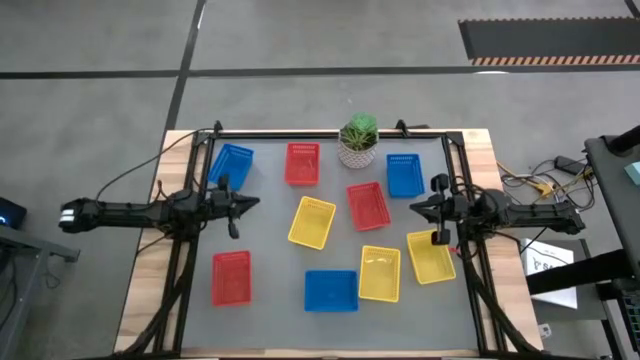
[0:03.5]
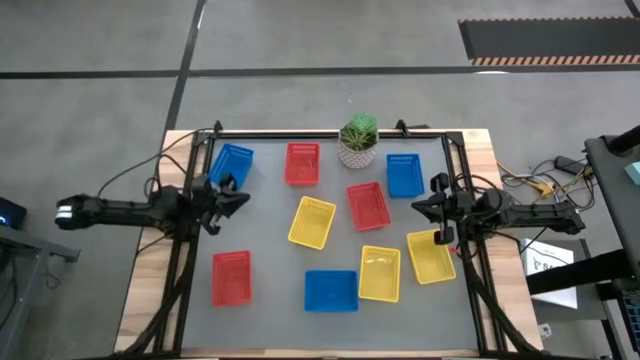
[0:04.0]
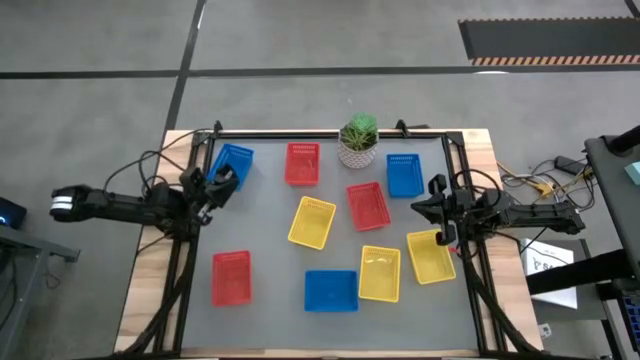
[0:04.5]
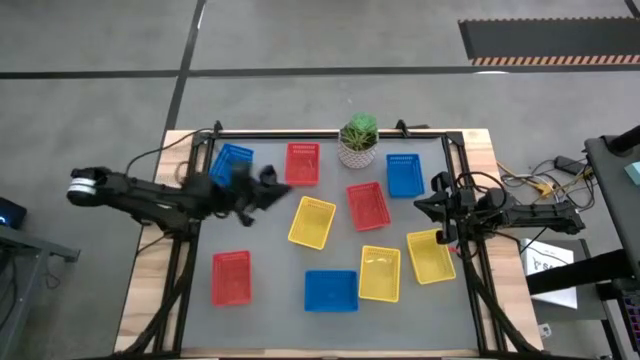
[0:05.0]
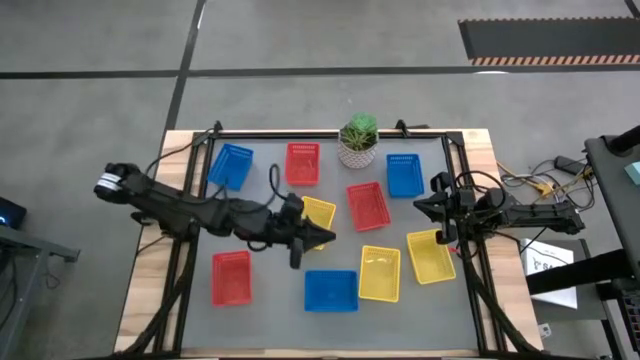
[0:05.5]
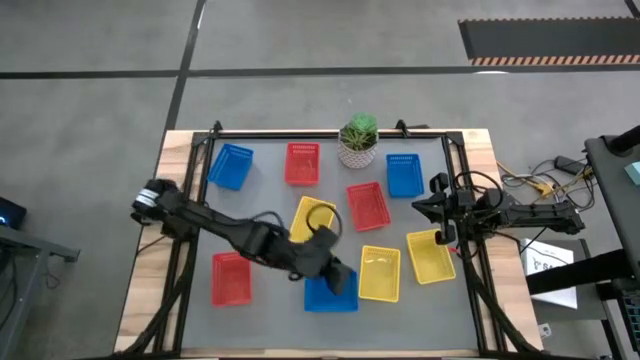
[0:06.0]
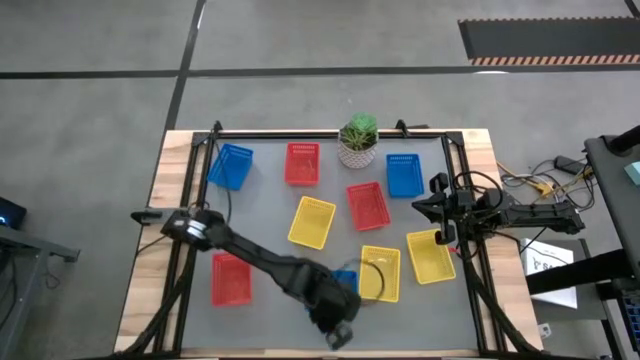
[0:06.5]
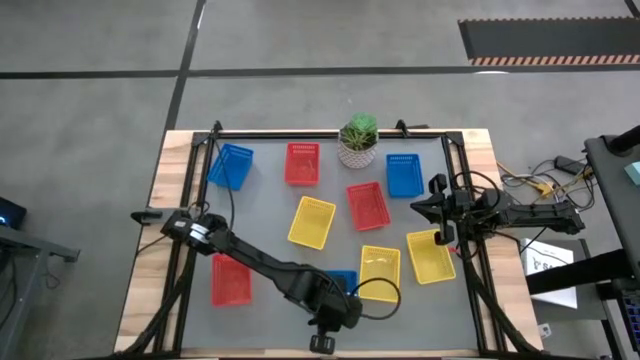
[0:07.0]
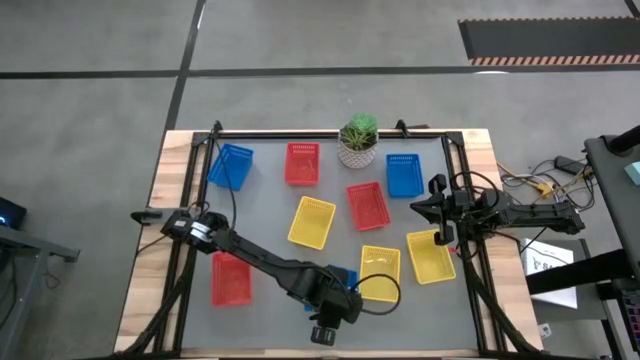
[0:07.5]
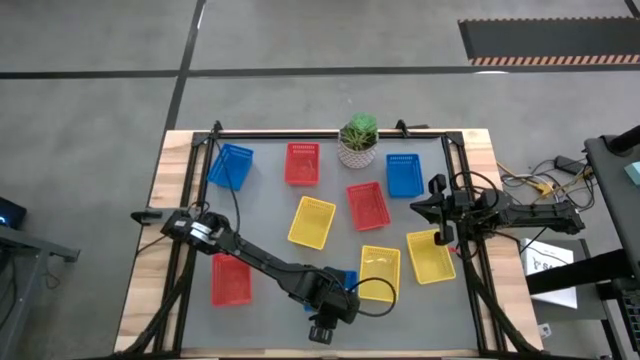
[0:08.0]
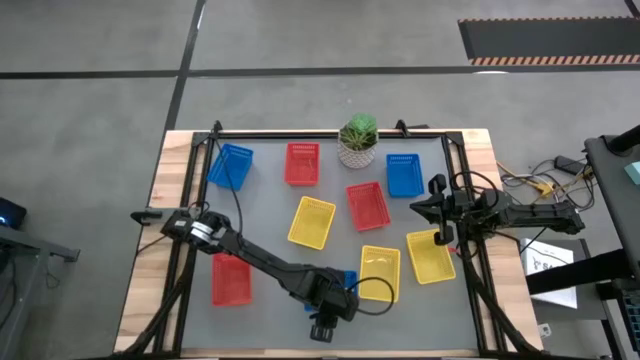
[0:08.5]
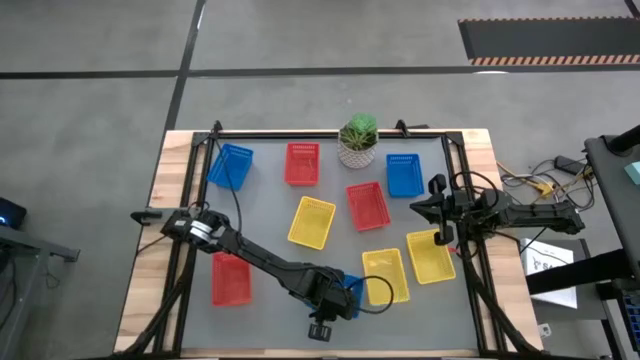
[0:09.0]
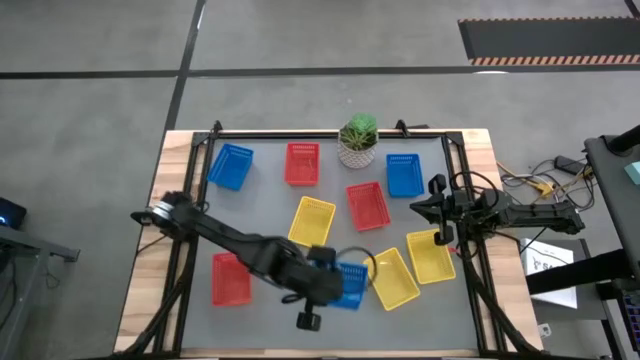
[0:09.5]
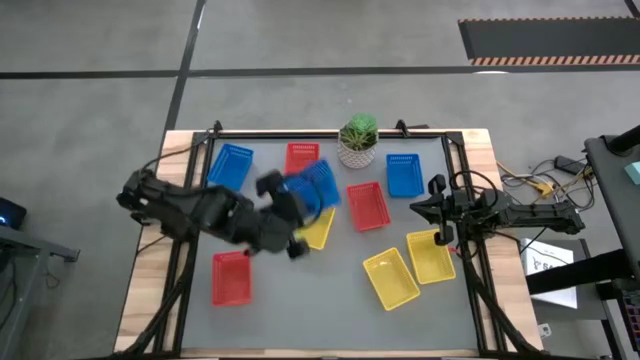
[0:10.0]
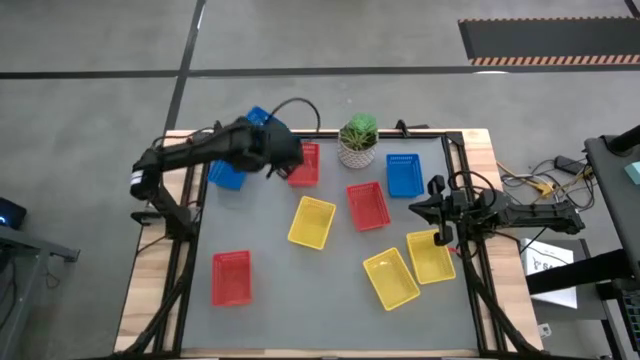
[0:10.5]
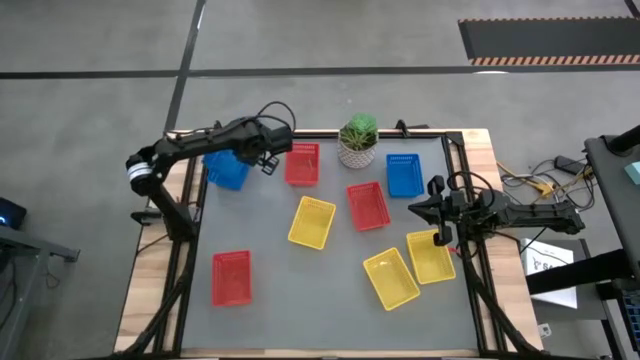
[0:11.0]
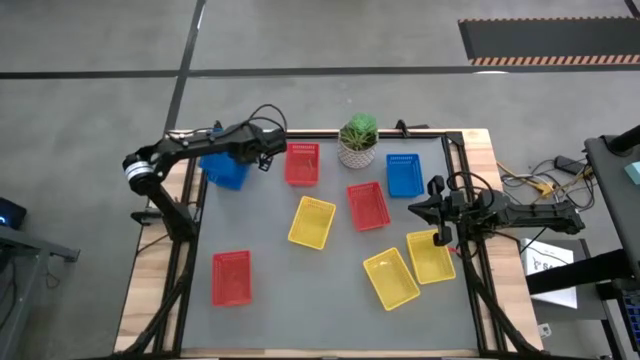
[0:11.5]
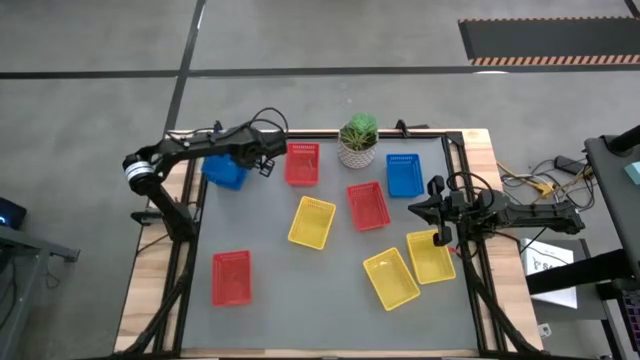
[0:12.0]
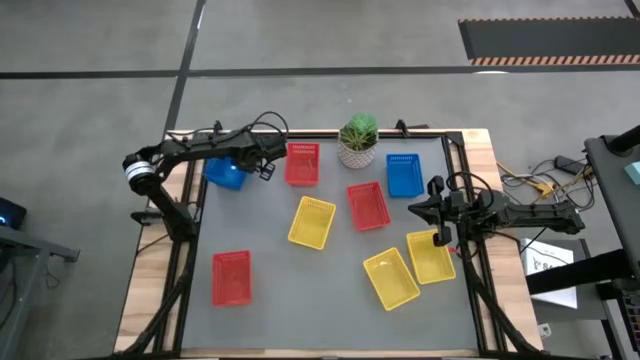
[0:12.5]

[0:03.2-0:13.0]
Stack the bottom blue bin on top of the top left blue bin

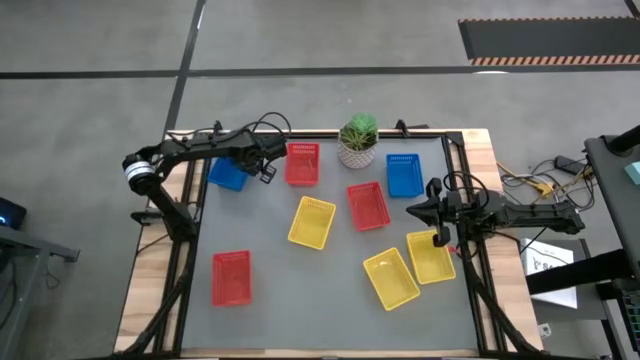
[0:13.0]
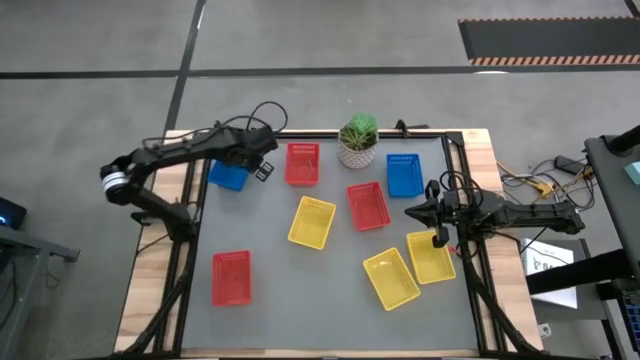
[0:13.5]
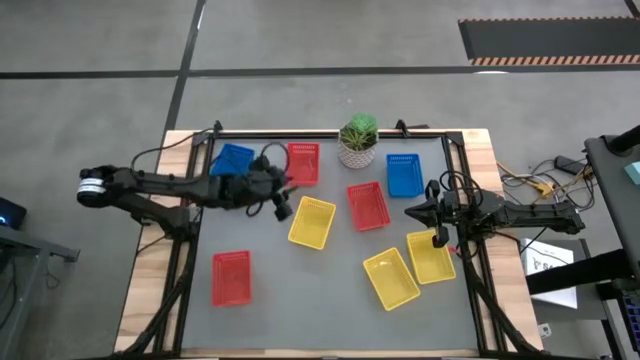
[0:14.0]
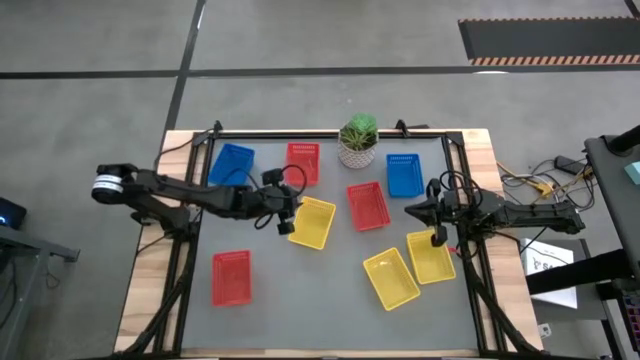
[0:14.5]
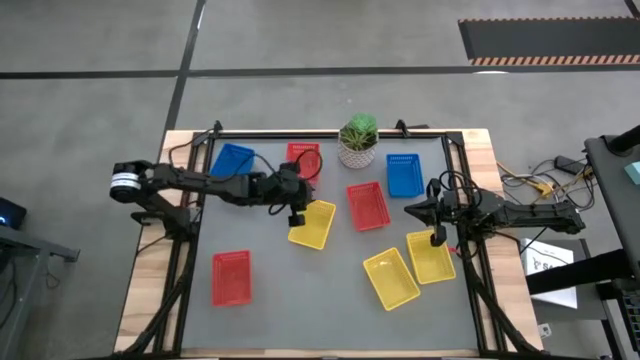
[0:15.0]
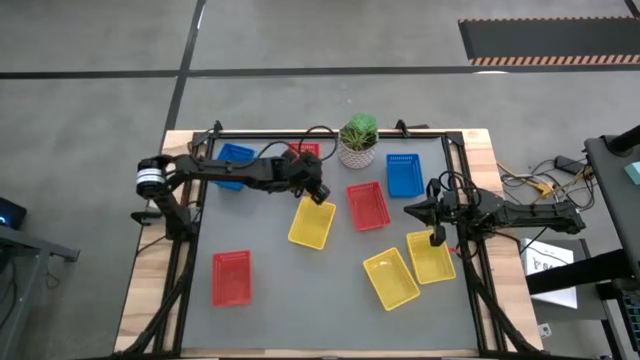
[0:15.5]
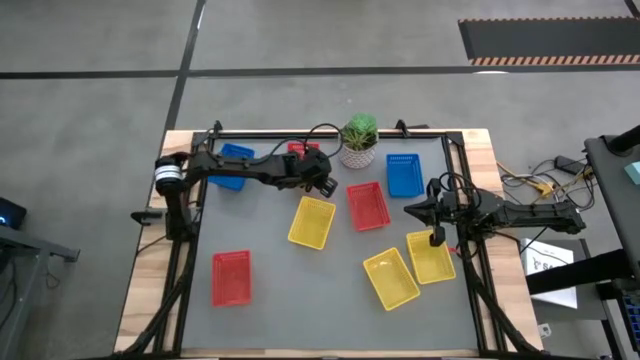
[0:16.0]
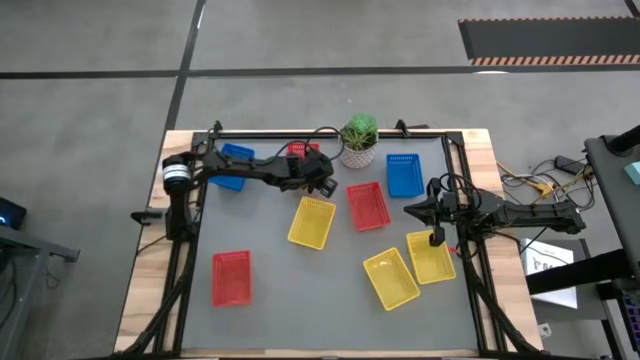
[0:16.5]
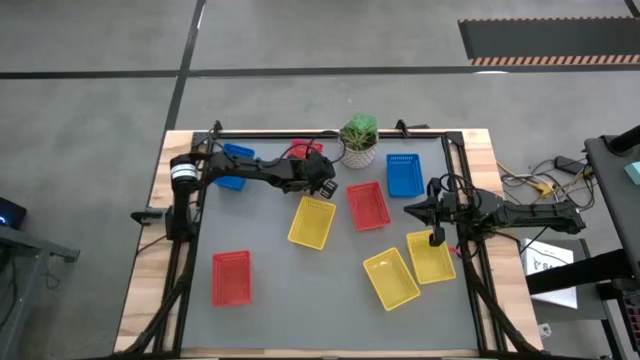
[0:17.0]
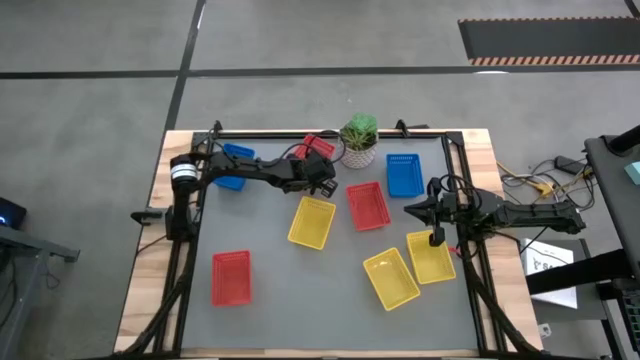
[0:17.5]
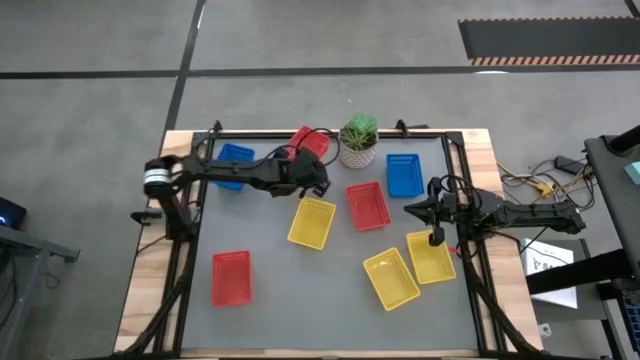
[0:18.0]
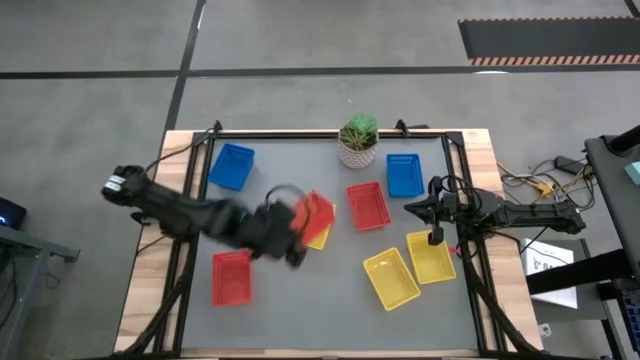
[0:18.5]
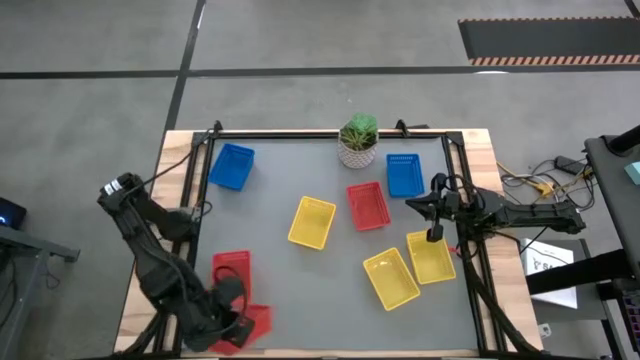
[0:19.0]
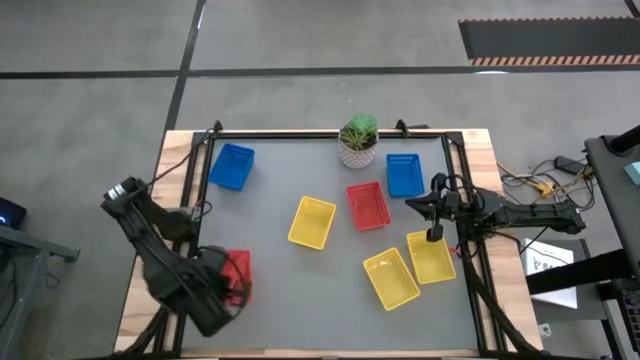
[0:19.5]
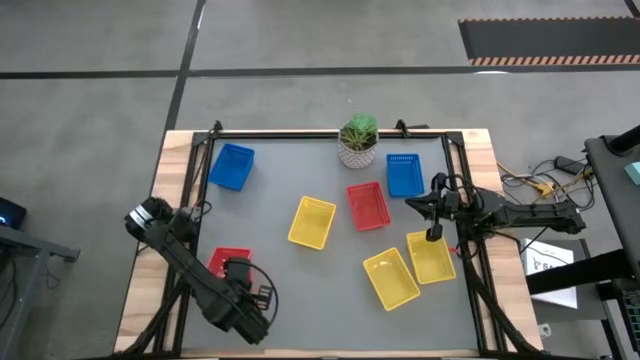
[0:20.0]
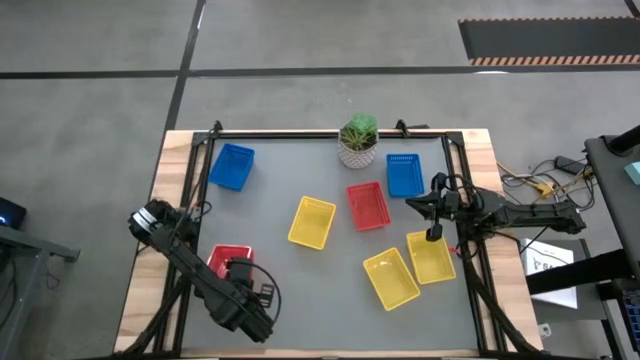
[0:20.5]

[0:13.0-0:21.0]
Stack the top red bin on top of the bottom red bin

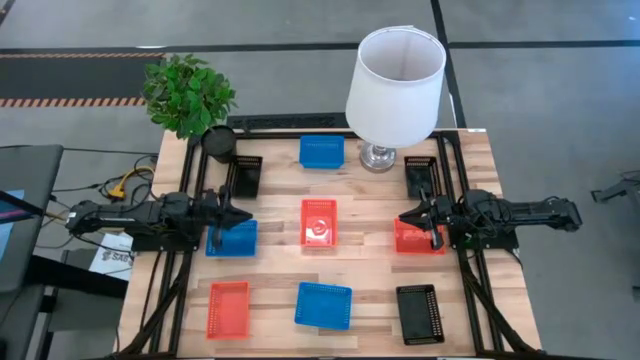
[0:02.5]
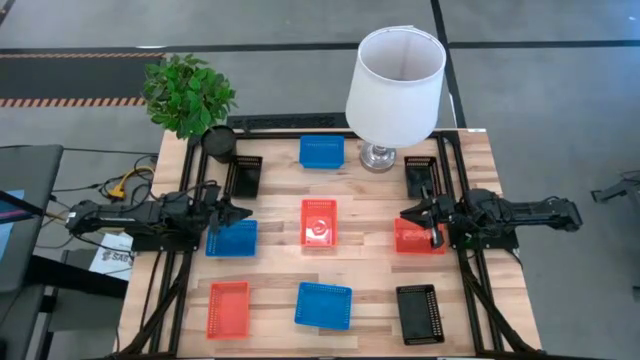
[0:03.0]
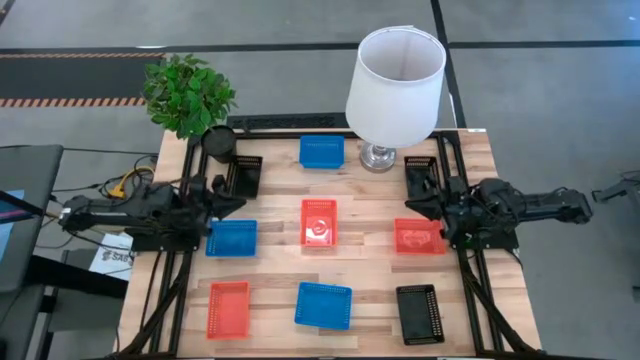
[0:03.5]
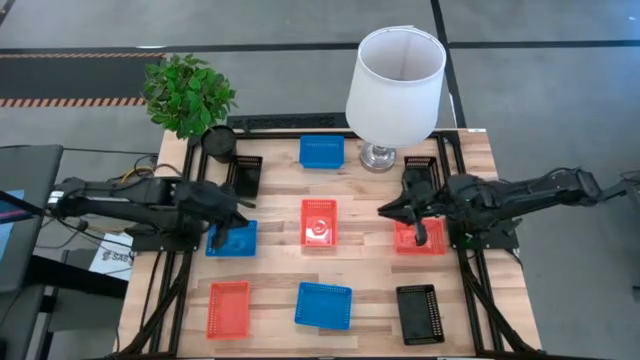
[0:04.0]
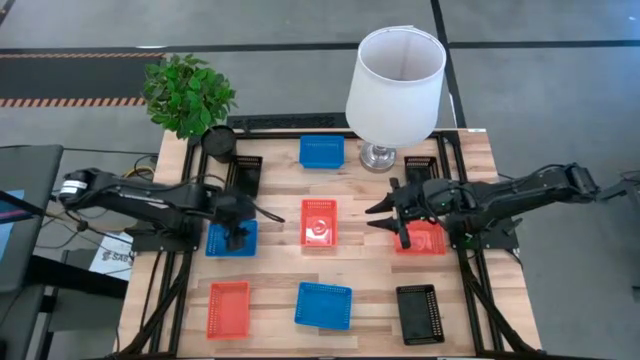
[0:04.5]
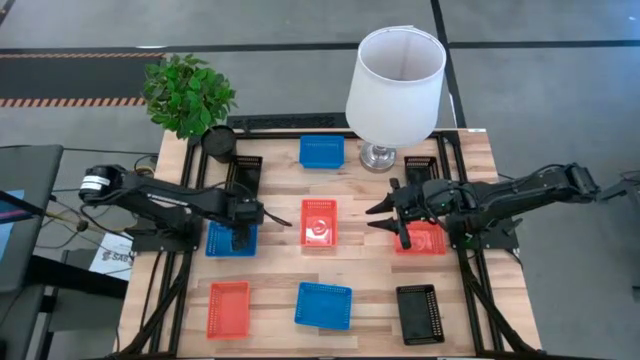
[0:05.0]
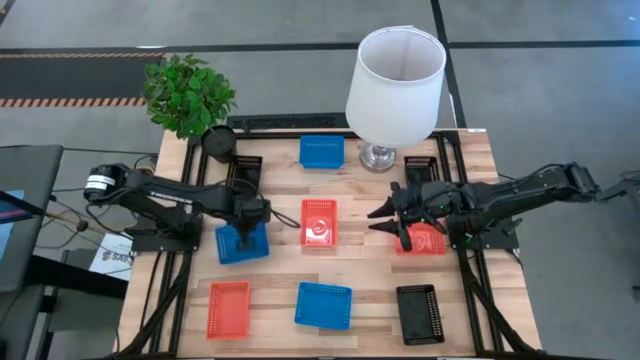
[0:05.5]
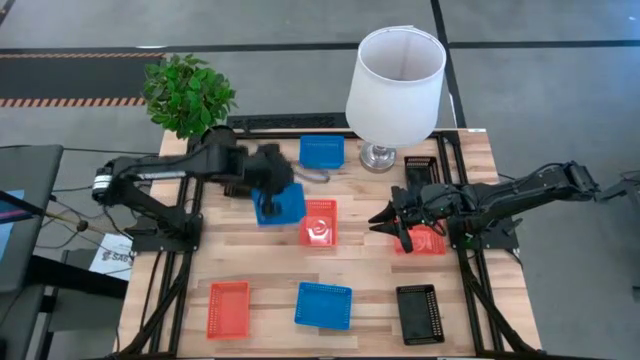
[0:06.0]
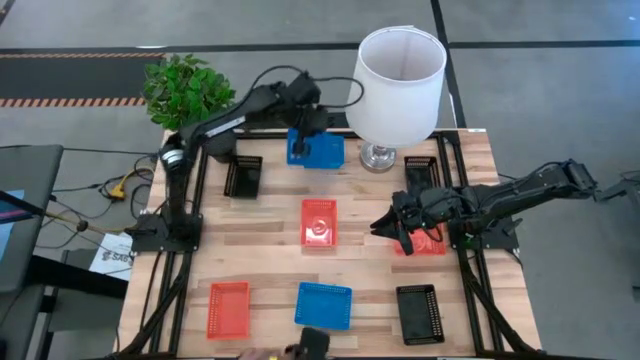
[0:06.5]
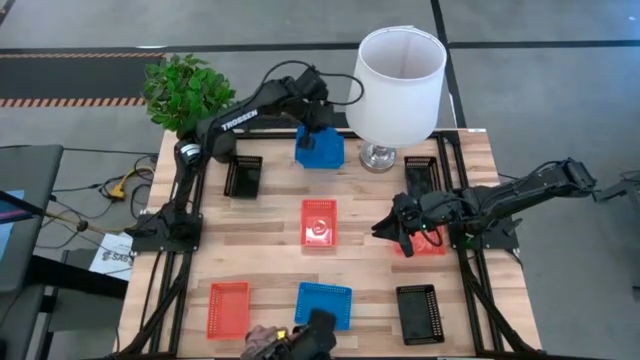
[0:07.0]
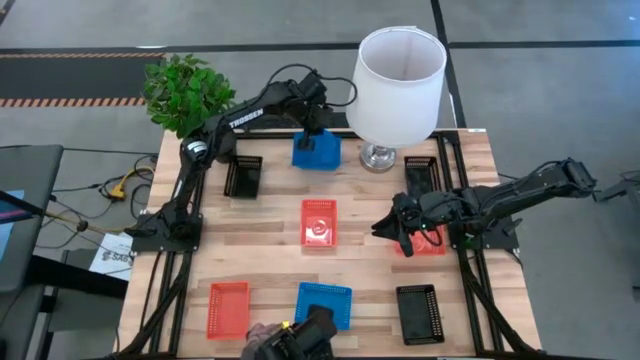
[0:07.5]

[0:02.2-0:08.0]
Stack the left blue bin on top of the top blue bin
